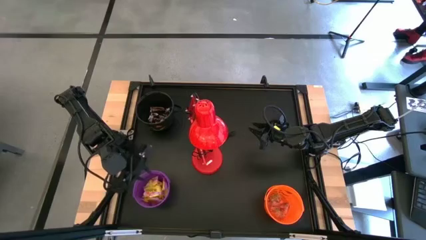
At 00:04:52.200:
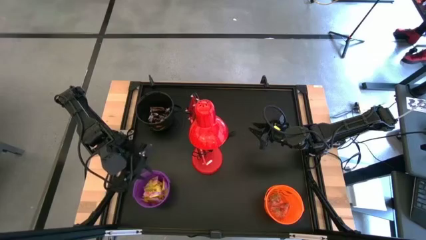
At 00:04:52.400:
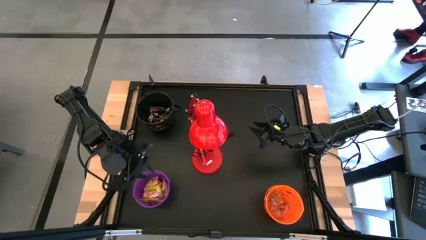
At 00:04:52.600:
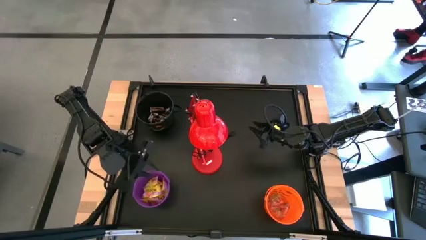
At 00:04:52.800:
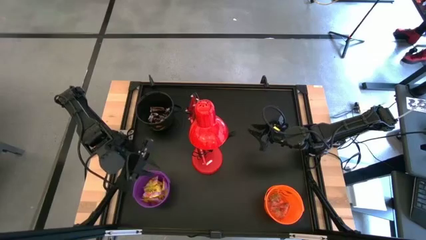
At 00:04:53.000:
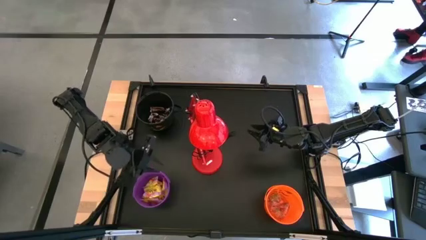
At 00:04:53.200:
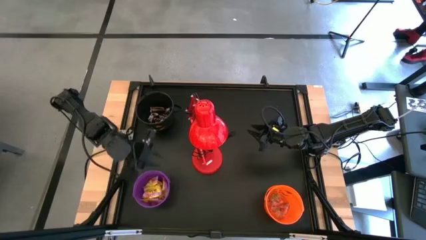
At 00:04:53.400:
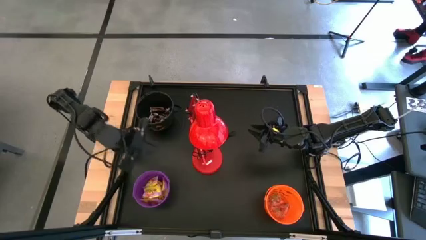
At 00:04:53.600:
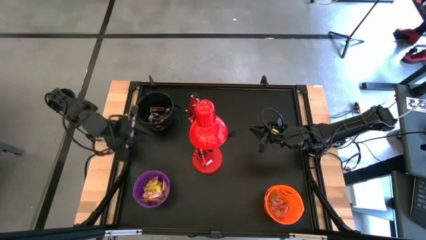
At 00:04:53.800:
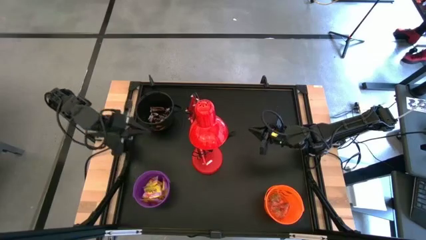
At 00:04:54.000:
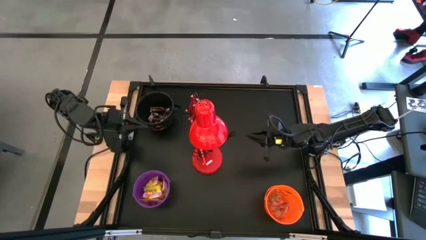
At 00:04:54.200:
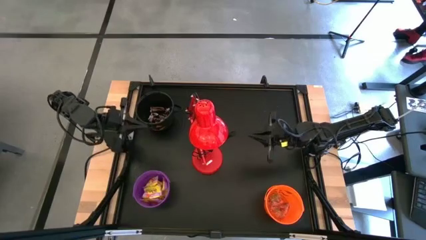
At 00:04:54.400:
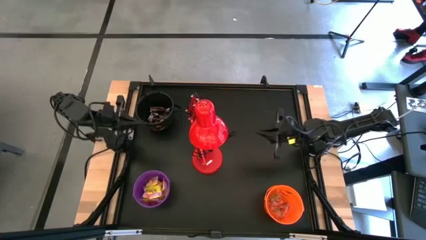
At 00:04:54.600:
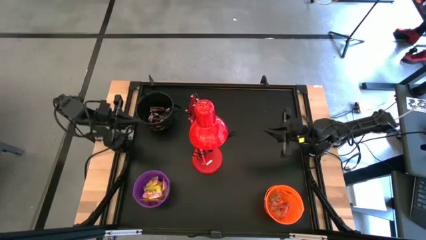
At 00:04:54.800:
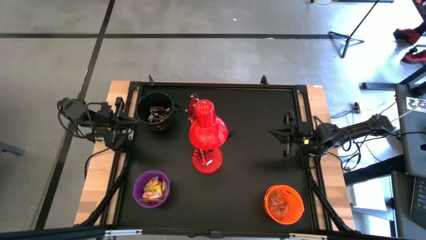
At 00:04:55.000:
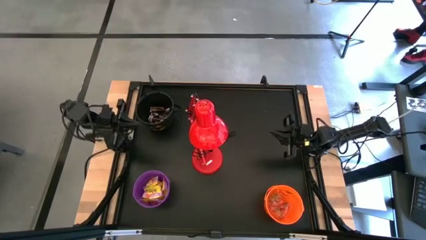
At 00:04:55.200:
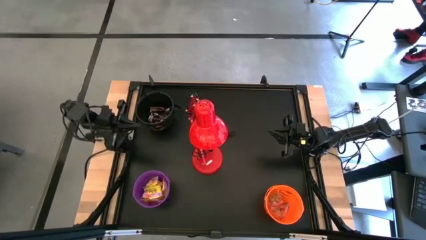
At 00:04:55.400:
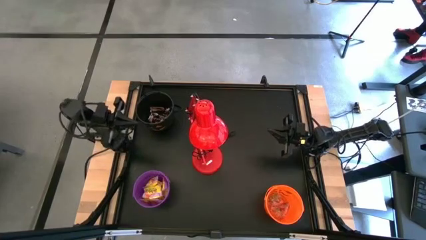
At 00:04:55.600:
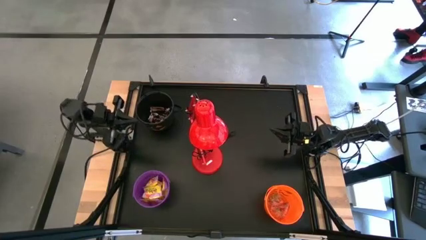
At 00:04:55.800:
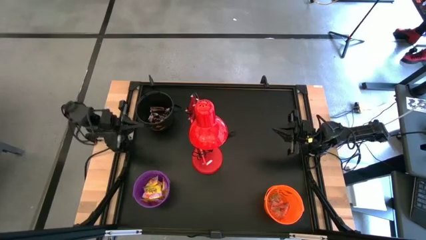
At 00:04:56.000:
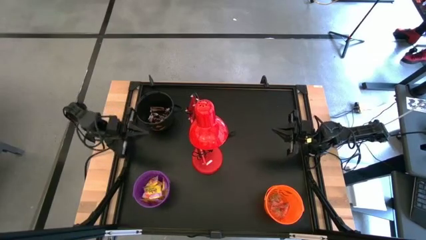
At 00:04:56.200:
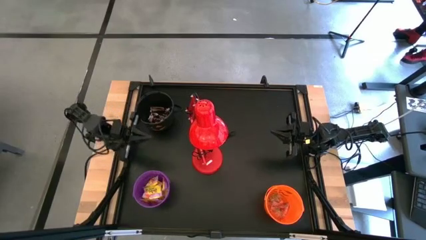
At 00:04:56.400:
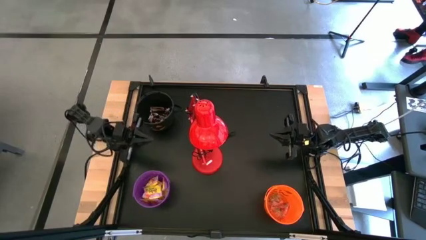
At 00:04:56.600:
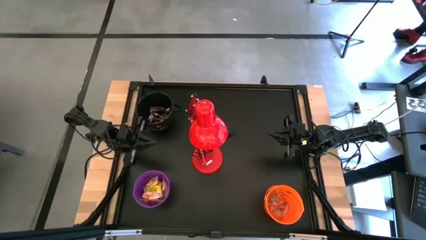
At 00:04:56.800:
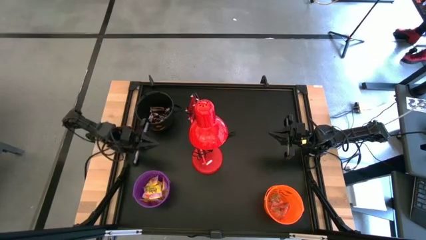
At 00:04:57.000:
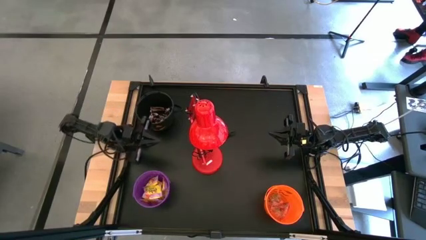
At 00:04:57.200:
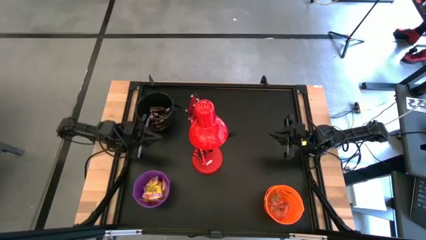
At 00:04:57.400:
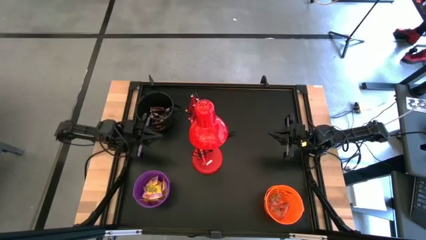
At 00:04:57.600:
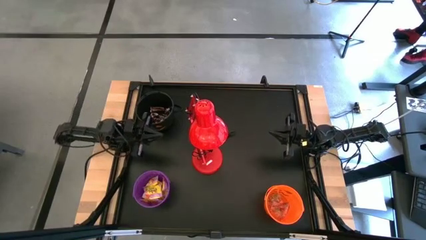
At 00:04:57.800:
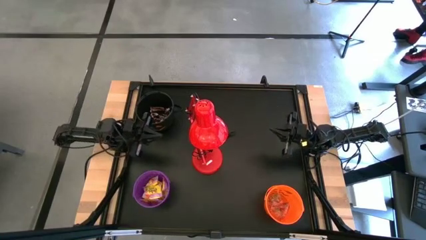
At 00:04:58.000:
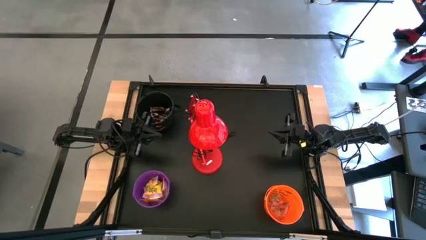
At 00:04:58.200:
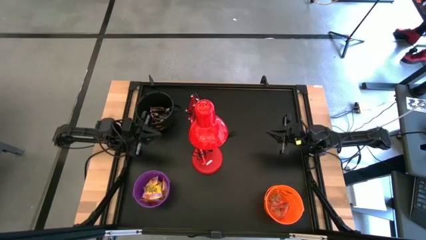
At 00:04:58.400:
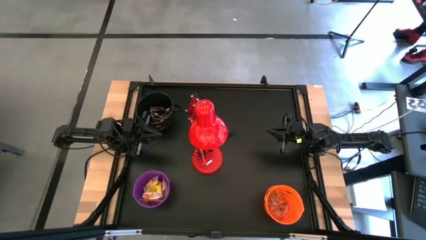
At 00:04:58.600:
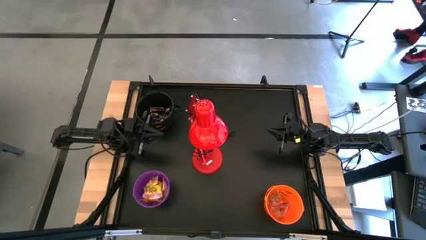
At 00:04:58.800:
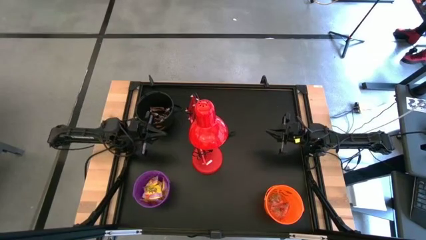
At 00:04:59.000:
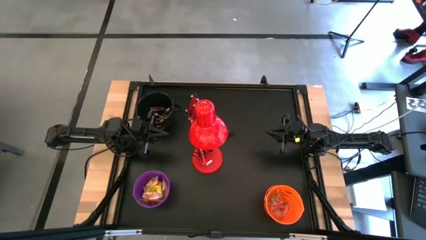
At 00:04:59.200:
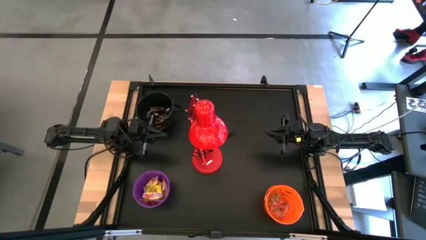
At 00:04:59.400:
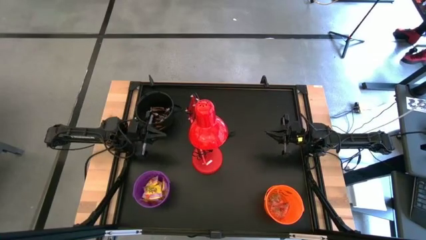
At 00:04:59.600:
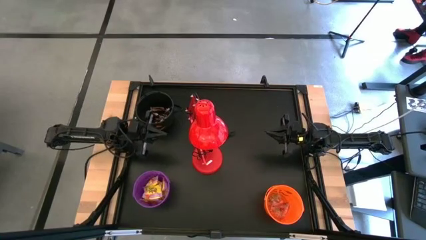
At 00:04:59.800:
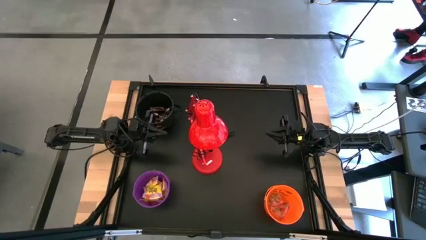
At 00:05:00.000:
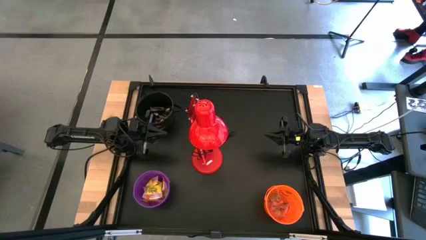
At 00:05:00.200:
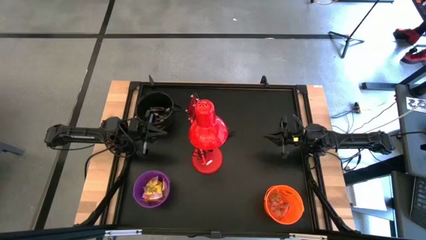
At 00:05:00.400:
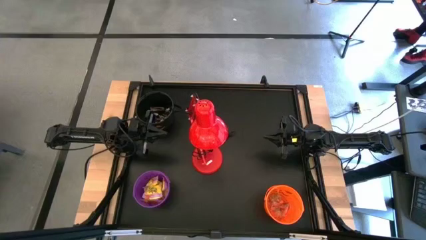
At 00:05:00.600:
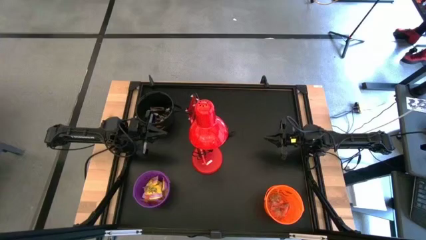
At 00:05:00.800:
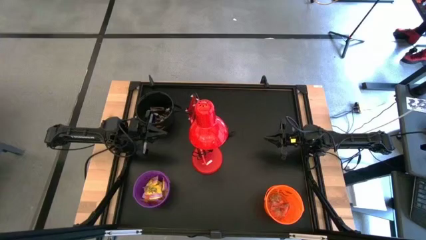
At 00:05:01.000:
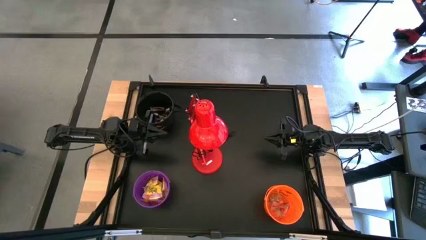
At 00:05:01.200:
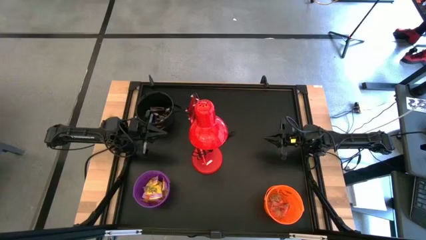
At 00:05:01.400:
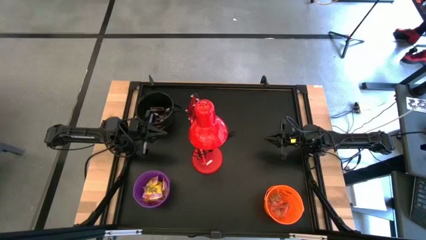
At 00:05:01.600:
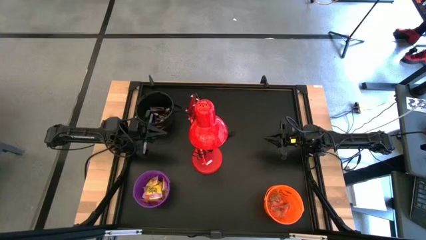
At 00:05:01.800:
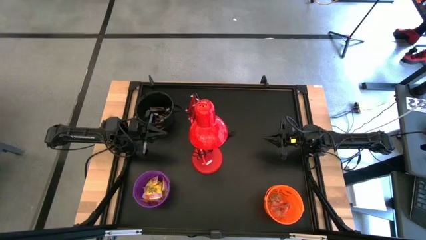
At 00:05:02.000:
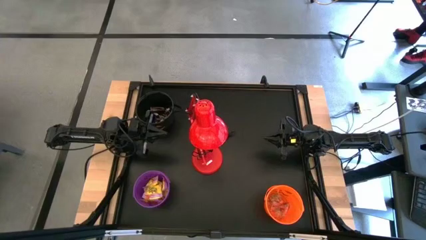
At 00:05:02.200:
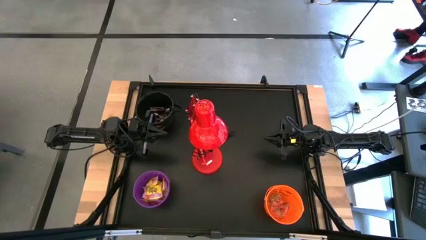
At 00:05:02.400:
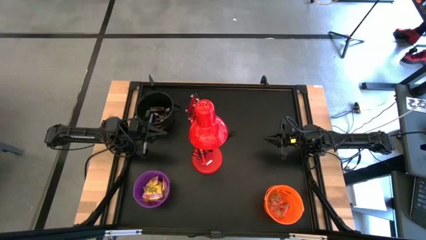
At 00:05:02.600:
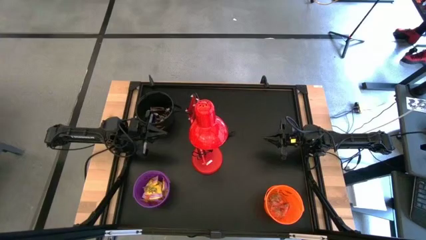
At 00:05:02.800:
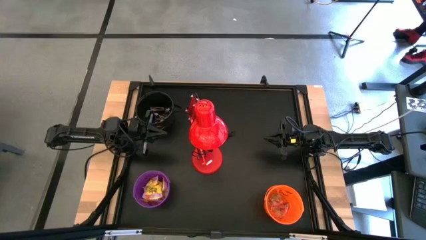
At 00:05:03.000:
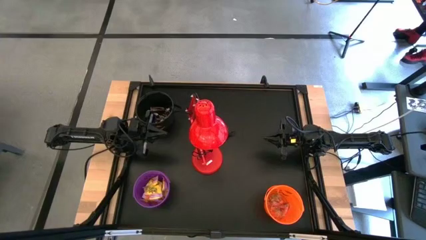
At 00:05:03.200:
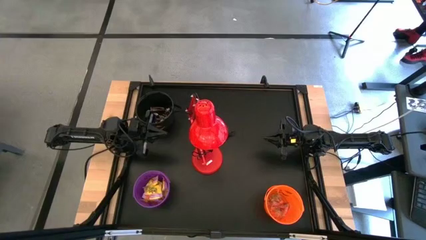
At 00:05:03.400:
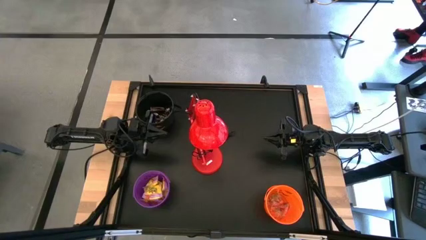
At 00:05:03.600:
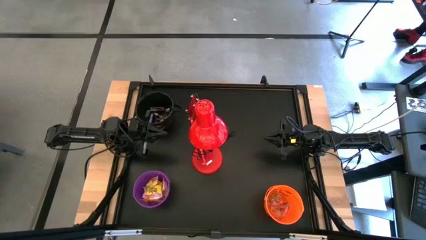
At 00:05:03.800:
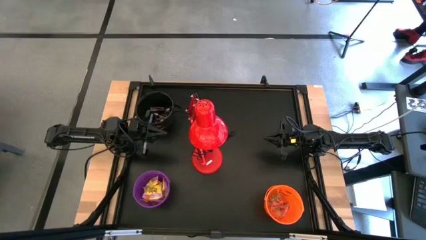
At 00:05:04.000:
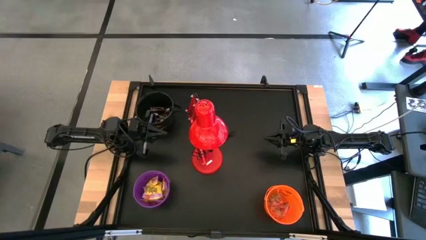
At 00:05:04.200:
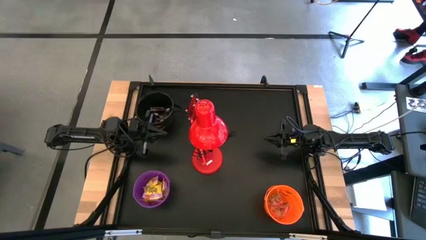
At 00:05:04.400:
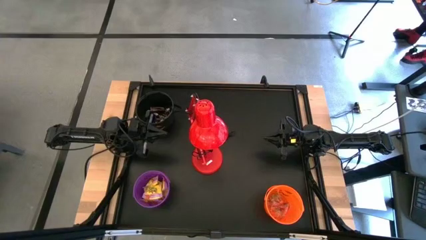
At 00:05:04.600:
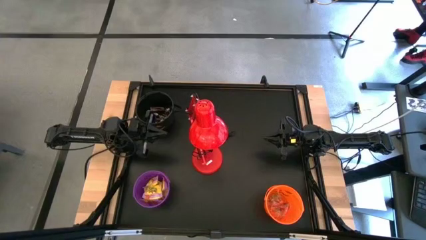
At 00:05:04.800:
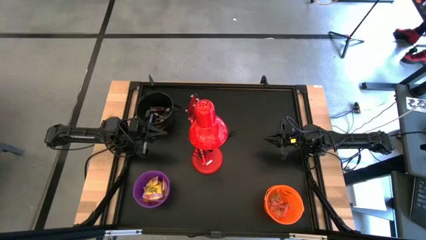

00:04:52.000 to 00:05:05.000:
Task: Organize candy in baskets
Return to Home Position
